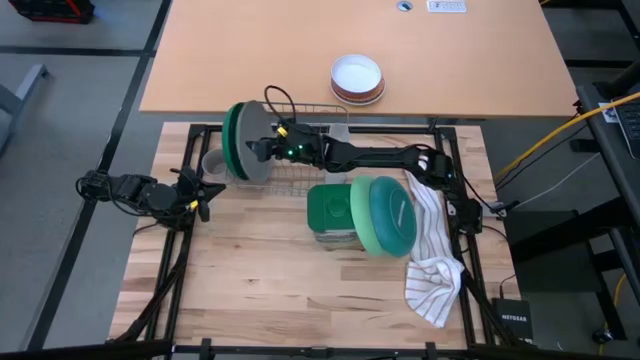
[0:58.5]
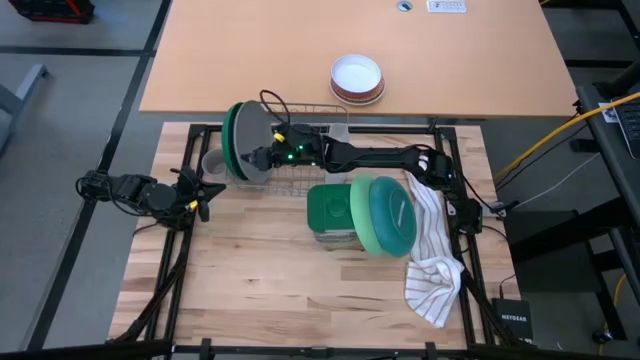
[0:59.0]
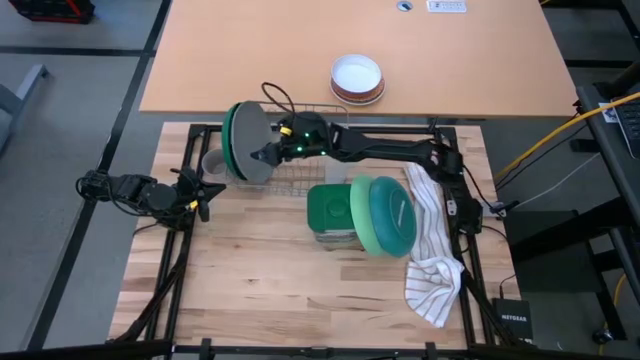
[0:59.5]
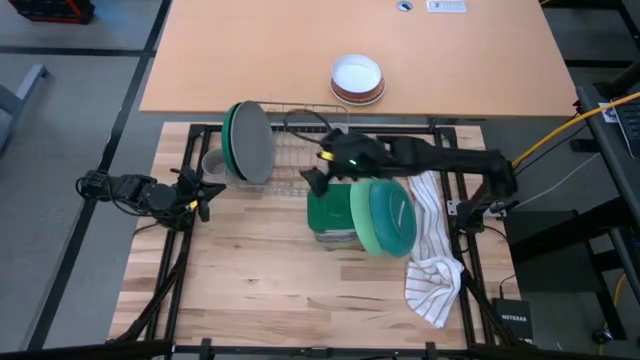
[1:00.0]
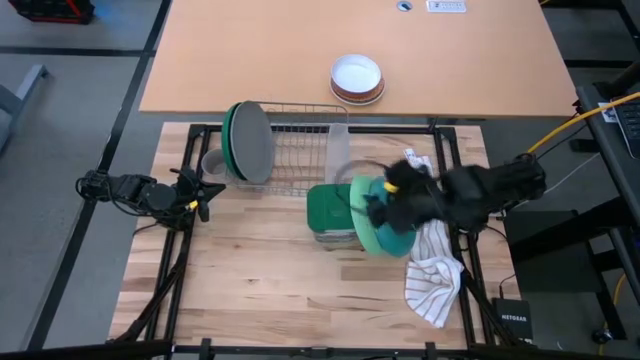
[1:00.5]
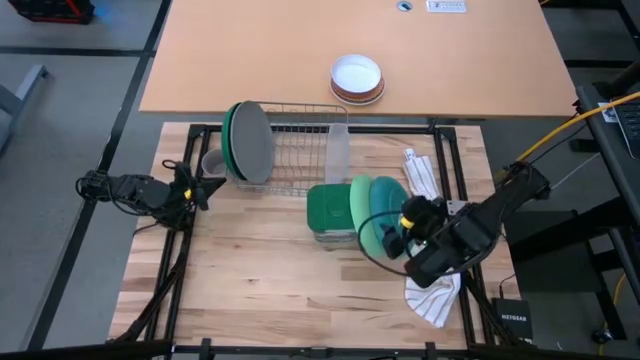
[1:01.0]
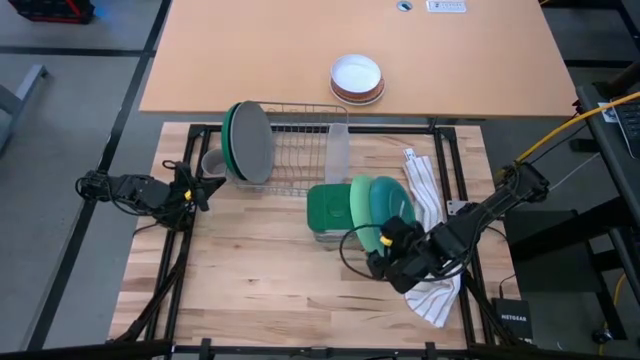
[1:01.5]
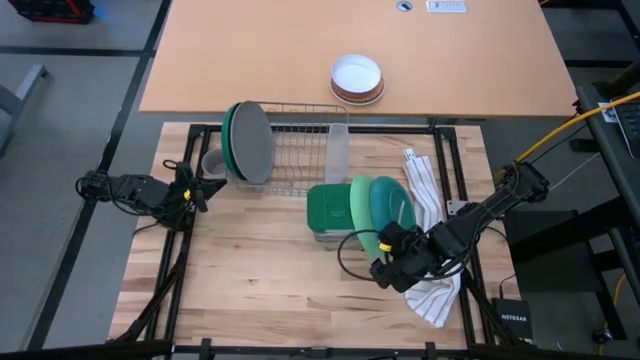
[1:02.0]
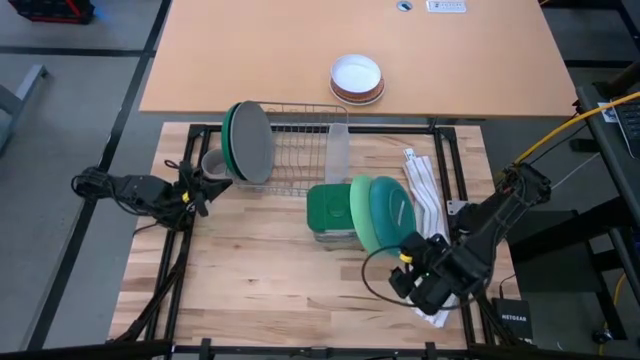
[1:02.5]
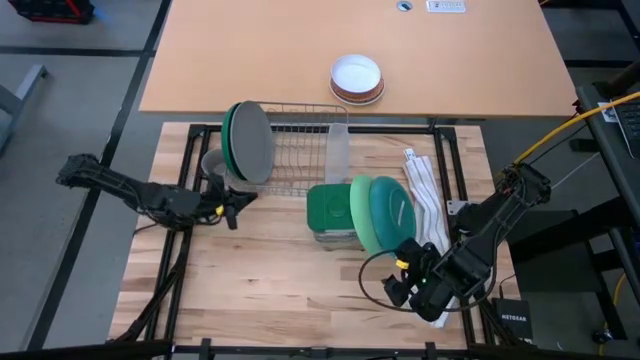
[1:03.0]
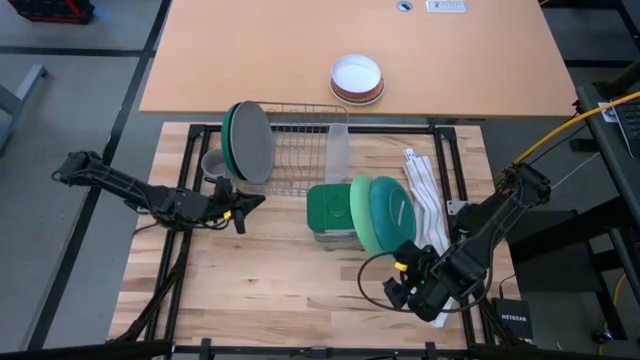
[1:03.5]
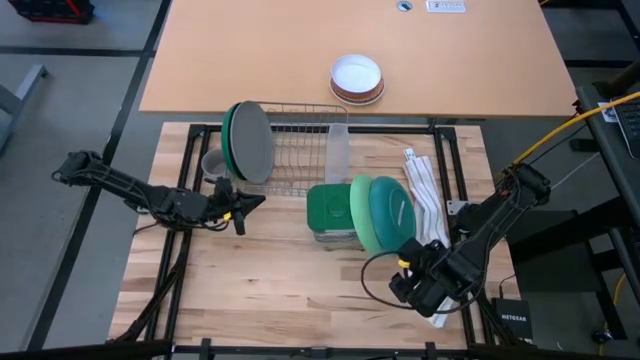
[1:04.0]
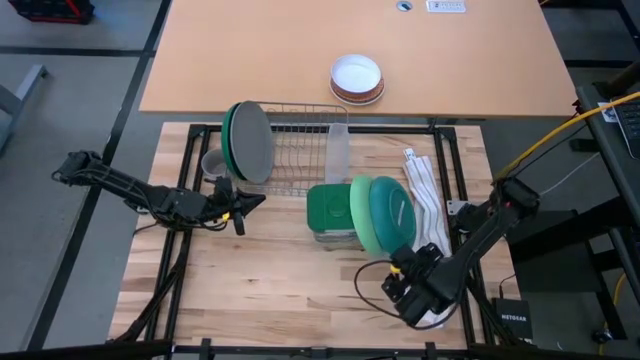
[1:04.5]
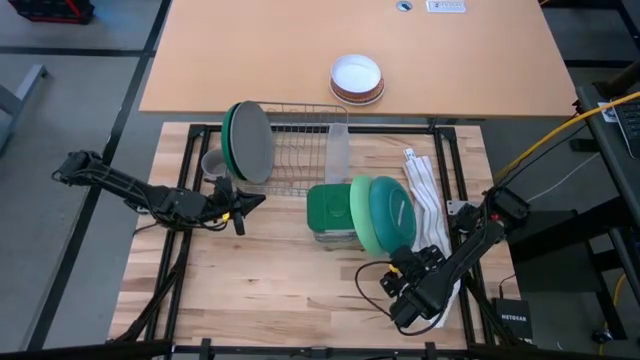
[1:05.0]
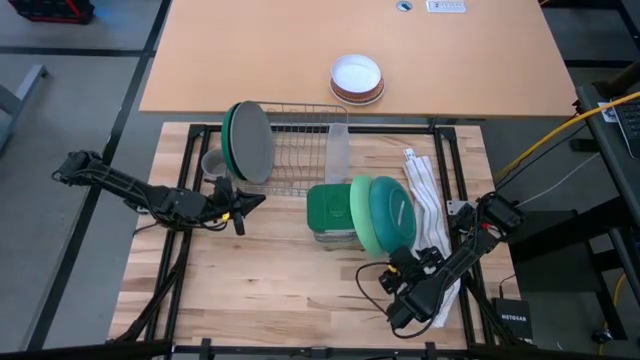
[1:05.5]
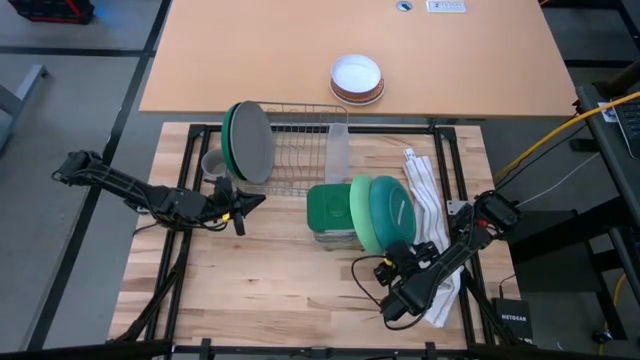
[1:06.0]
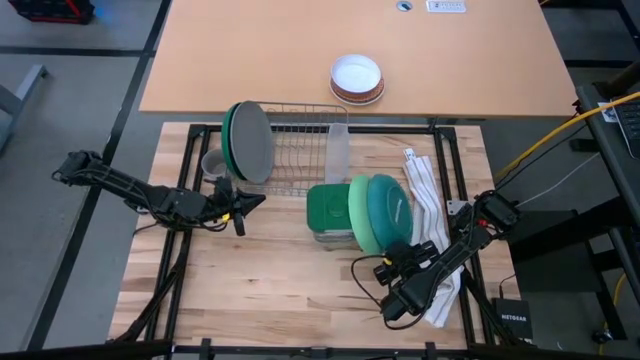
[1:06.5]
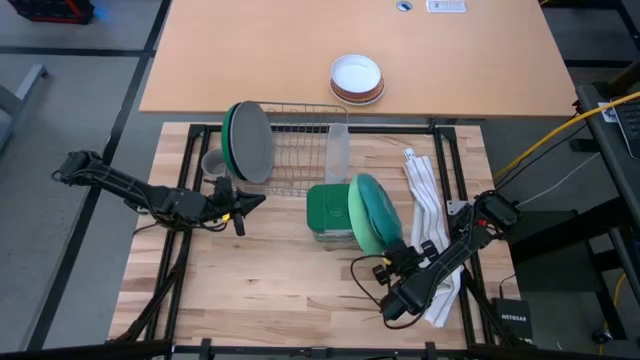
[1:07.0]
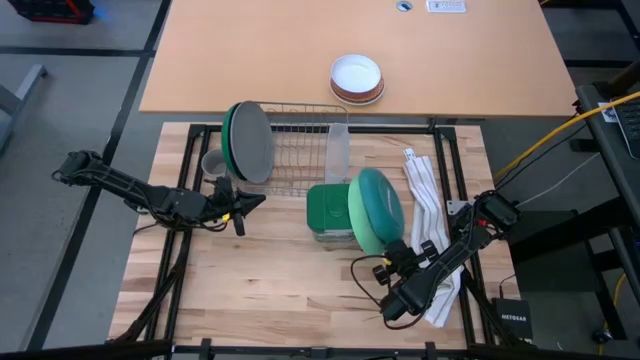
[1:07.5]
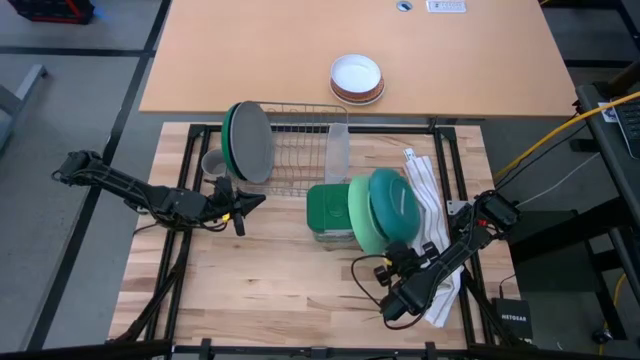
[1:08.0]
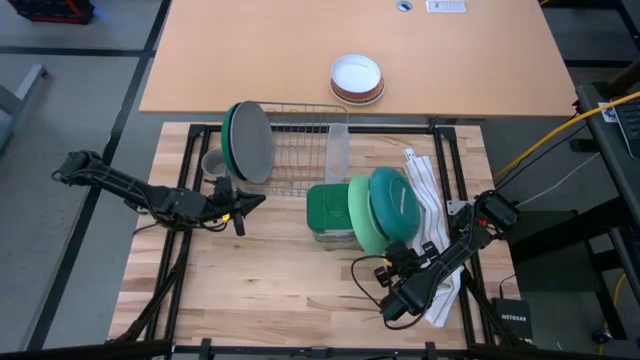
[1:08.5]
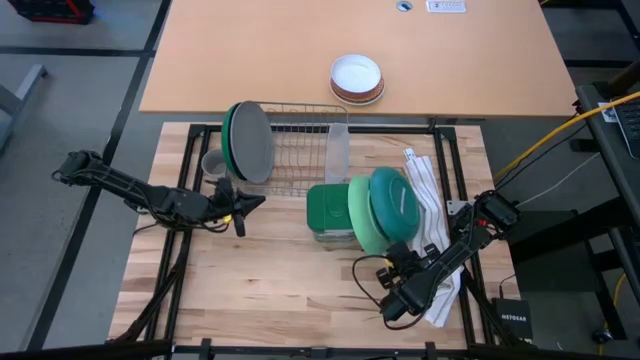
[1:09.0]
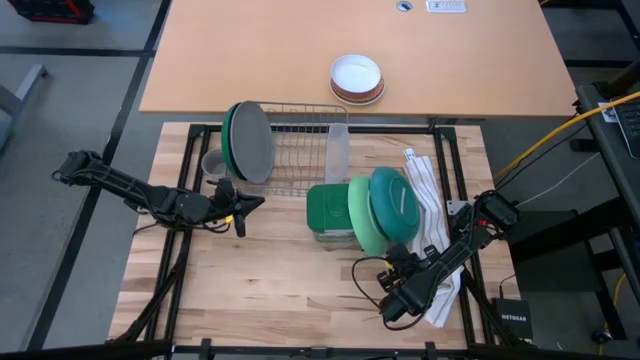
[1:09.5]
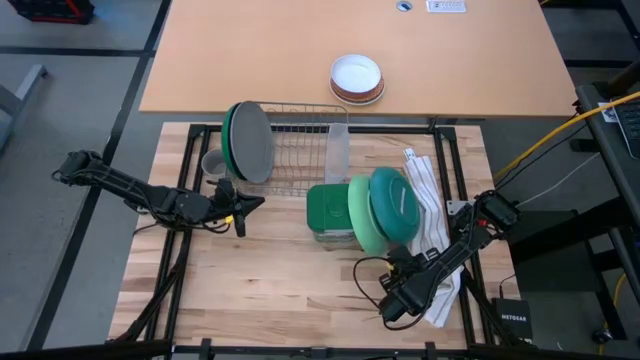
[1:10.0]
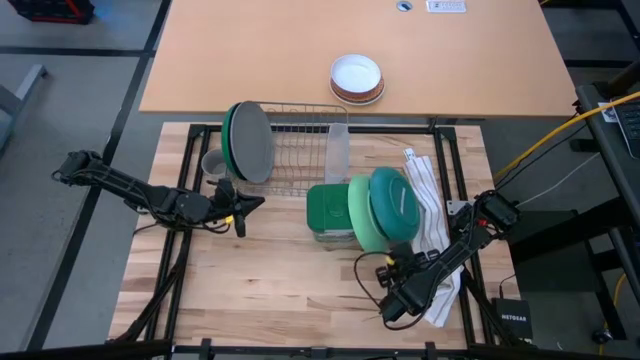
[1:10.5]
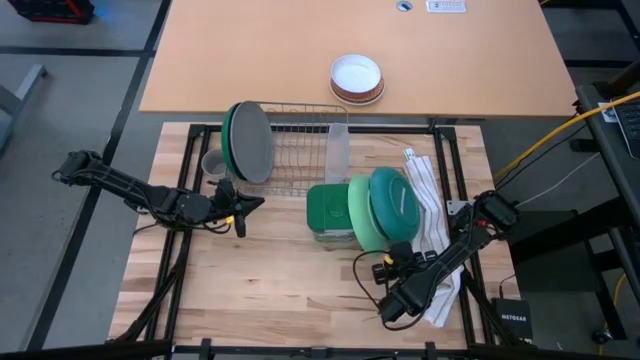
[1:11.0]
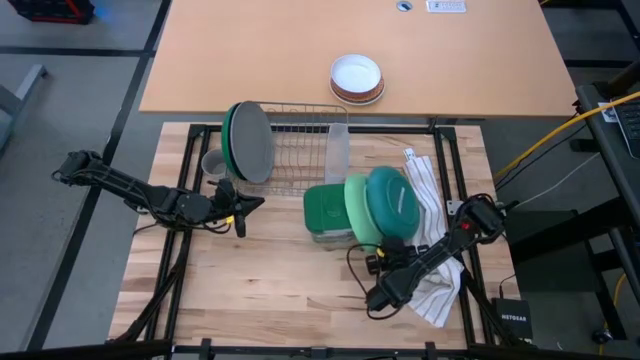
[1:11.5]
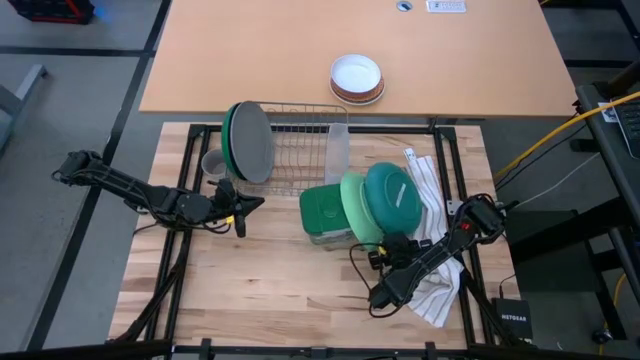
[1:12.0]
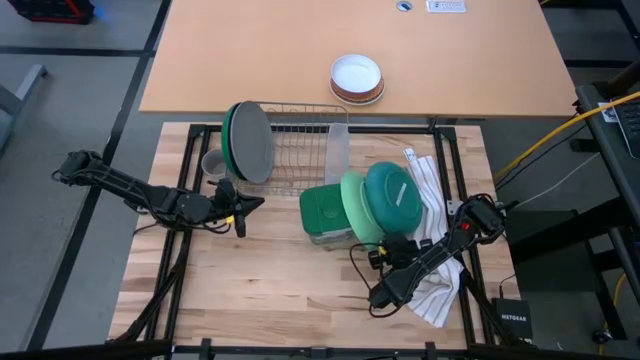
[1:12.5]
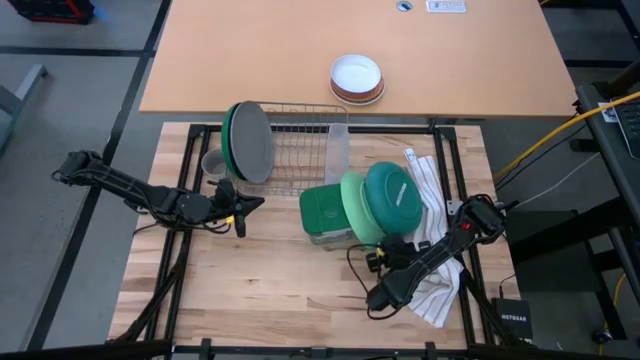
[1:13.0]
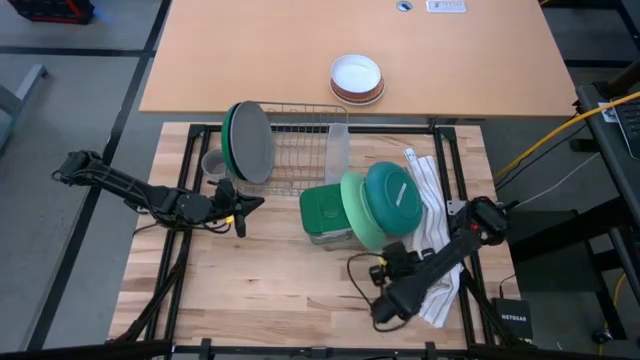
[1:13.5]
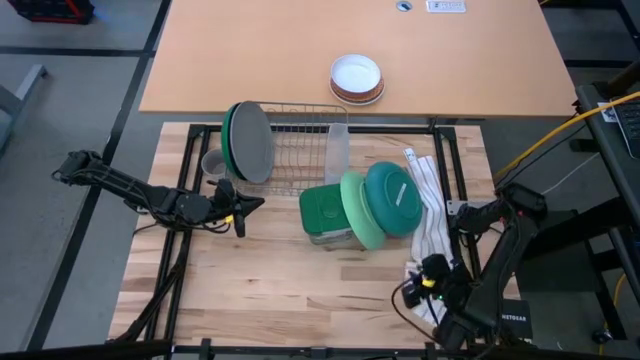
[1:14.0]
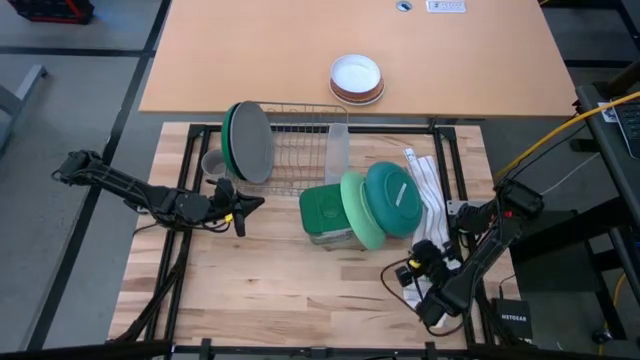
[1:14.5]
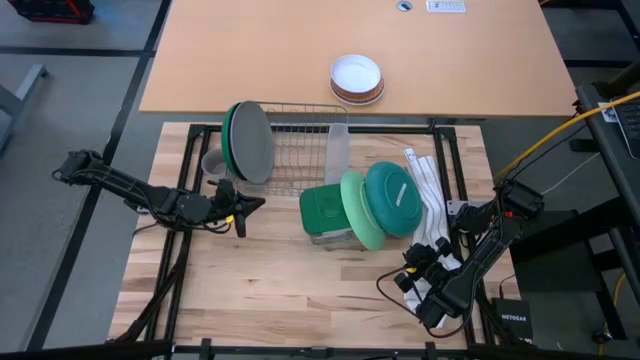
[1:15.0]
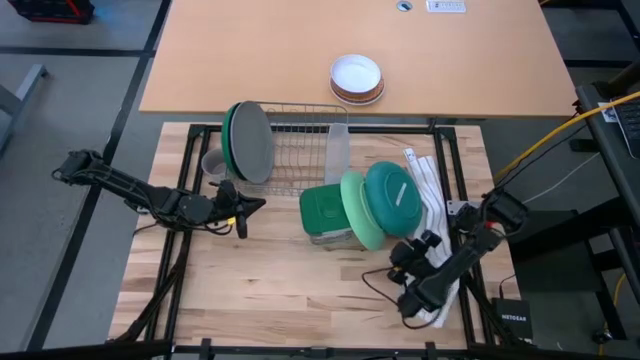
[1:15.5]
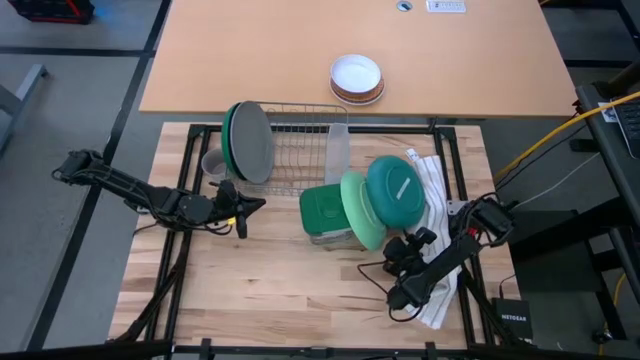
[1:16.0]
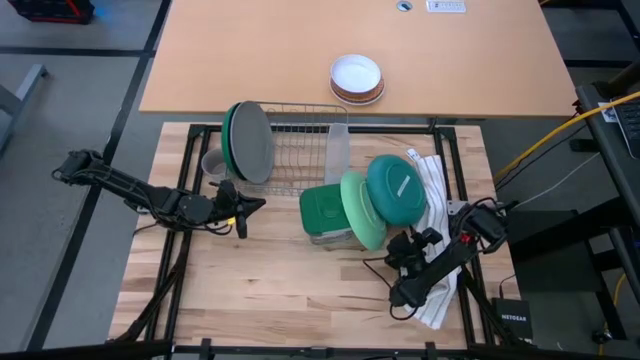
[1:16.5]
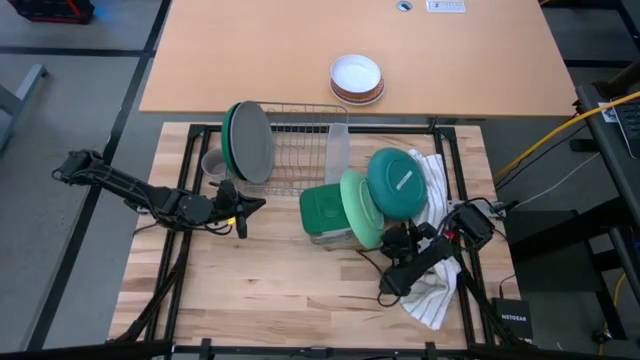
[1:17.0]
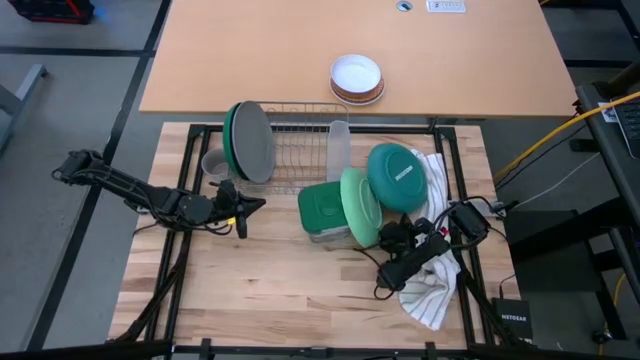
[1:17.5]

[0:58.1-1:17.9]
Task: Sort dishes
Put the blue plate into the dish rack

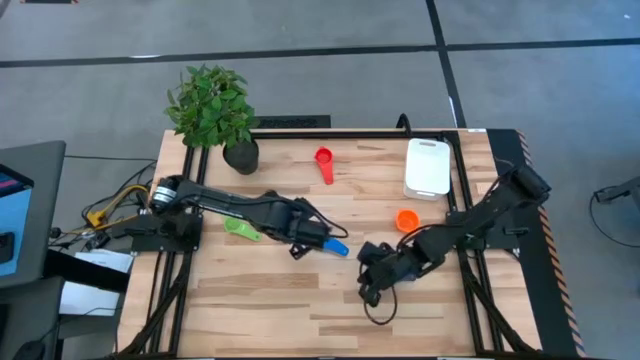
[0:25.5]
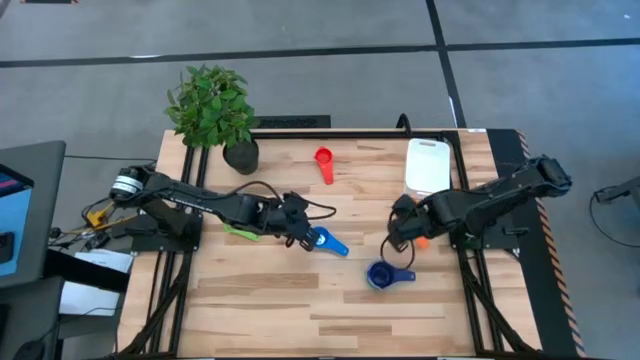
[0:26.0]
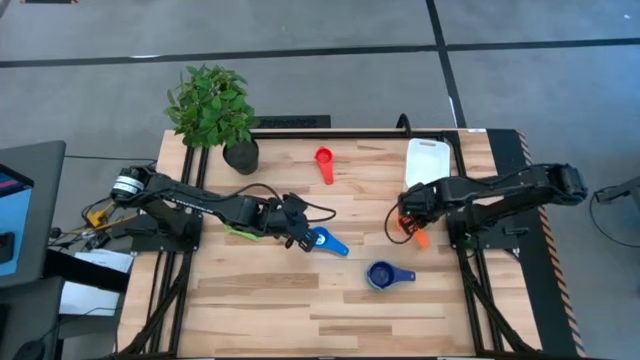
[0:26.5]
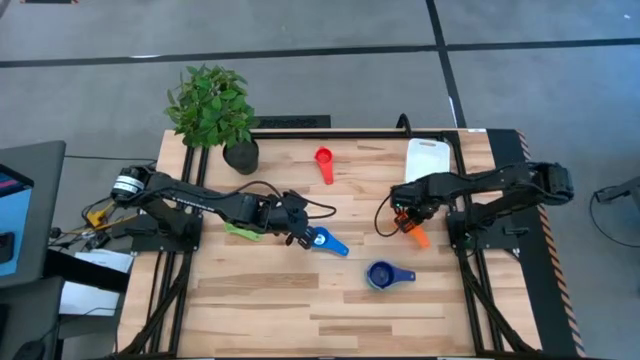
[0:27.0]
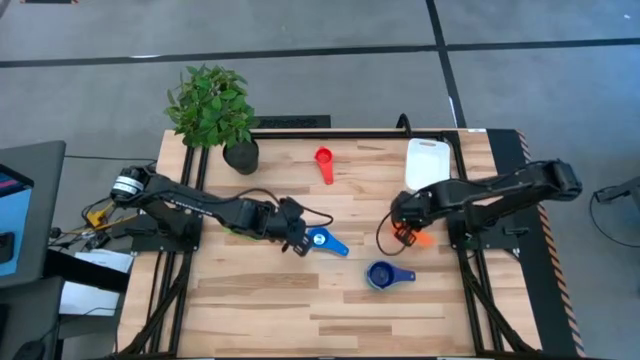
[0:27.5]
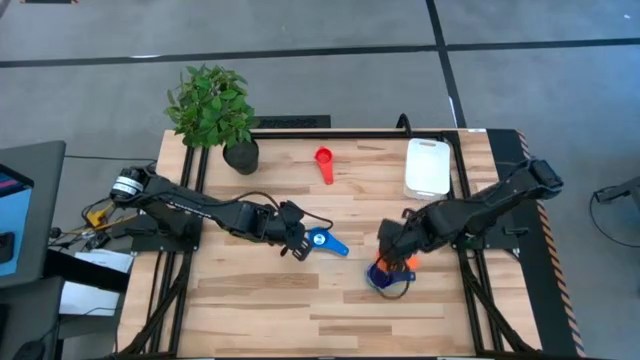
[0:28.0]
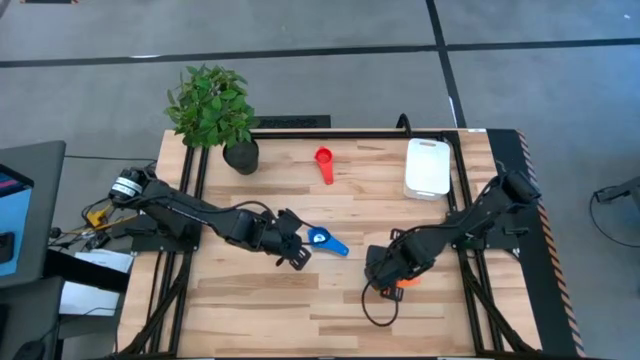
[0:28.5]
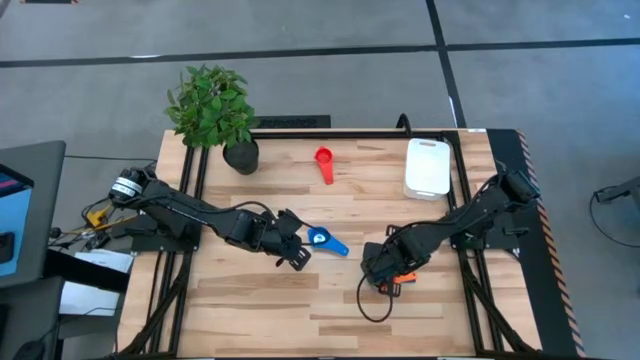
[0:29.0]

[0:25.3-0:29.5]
Task: Nest measuring cups in basket
Stack the orange measuring cup on the dark blue measuring cup
